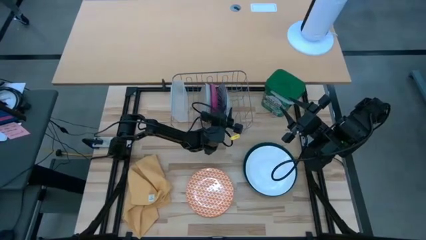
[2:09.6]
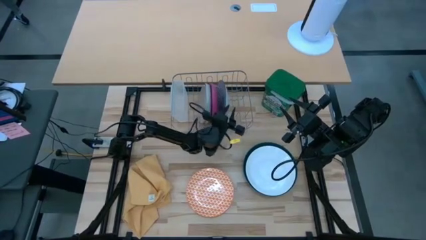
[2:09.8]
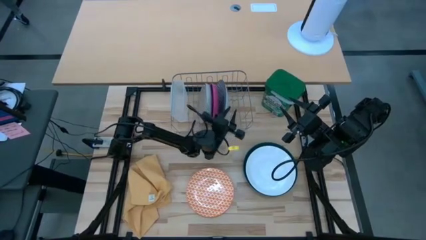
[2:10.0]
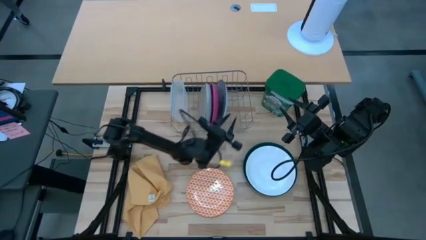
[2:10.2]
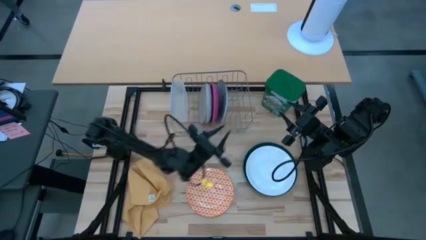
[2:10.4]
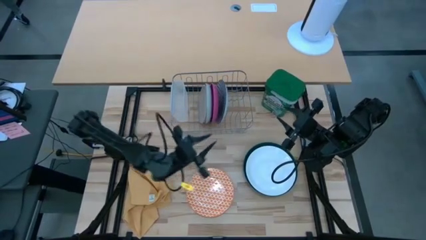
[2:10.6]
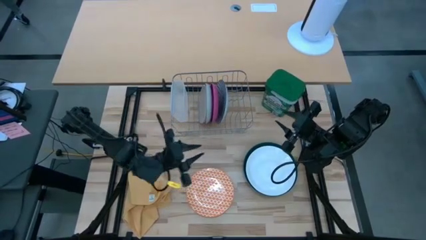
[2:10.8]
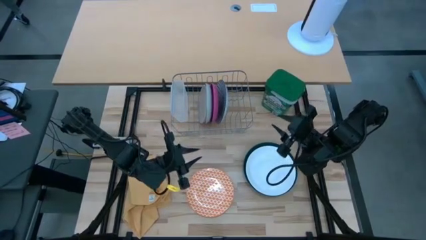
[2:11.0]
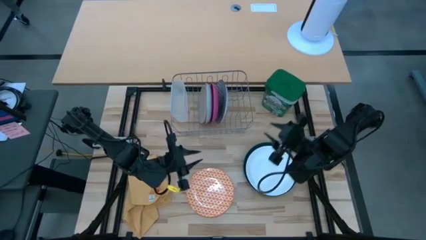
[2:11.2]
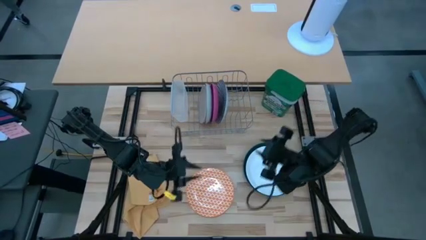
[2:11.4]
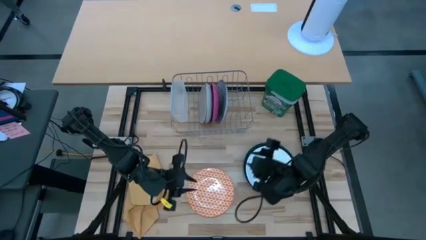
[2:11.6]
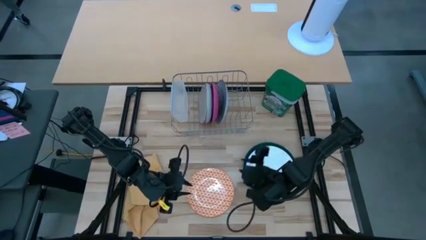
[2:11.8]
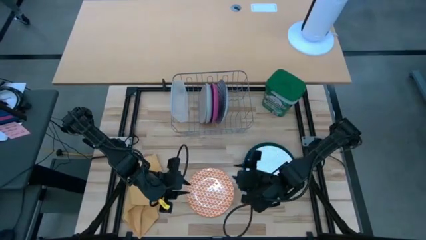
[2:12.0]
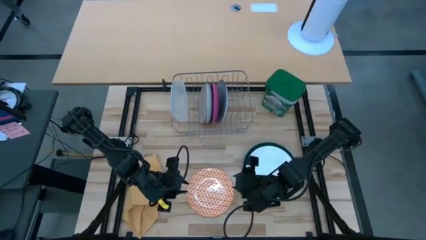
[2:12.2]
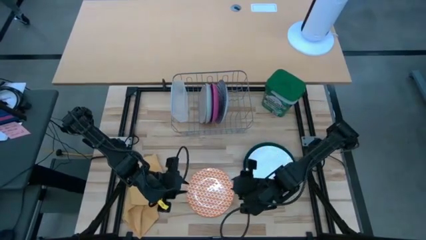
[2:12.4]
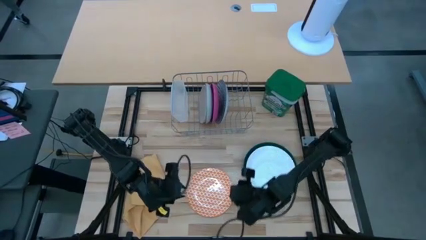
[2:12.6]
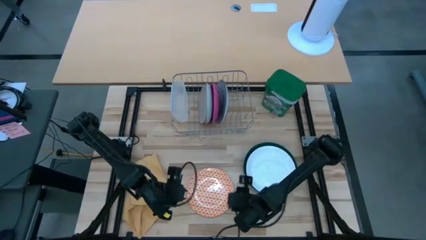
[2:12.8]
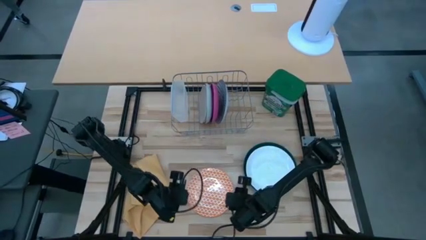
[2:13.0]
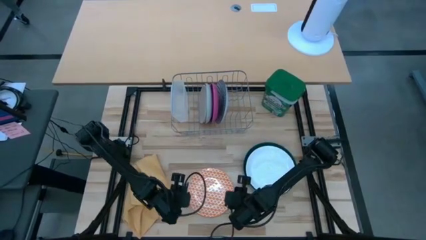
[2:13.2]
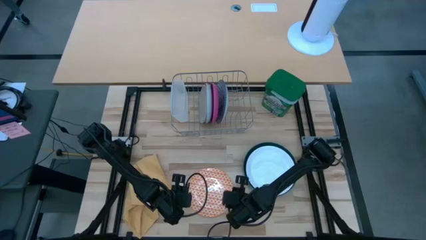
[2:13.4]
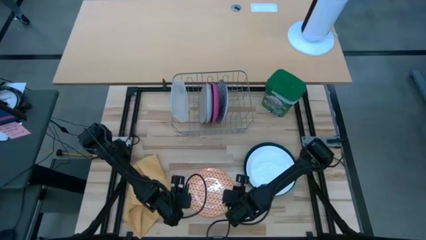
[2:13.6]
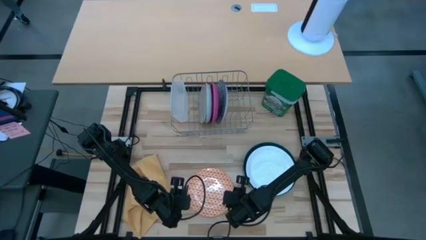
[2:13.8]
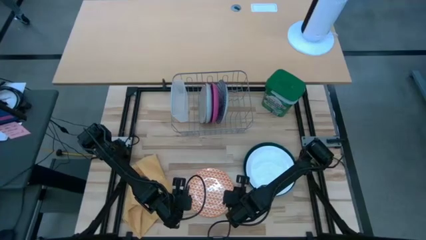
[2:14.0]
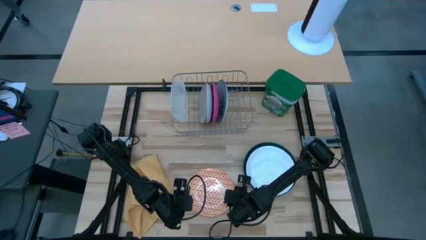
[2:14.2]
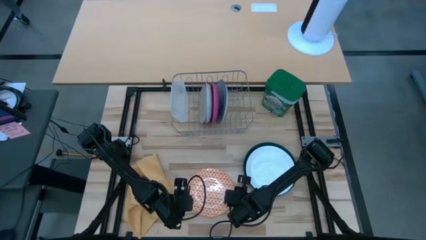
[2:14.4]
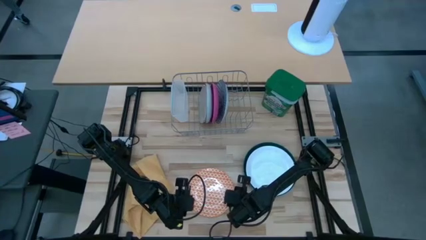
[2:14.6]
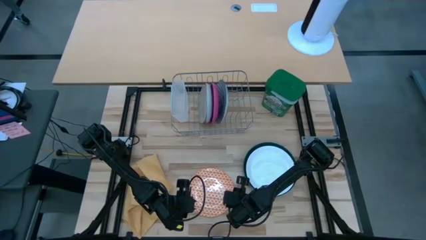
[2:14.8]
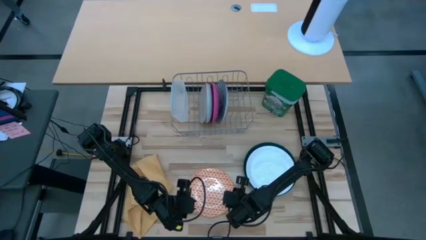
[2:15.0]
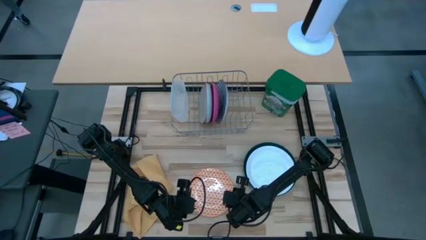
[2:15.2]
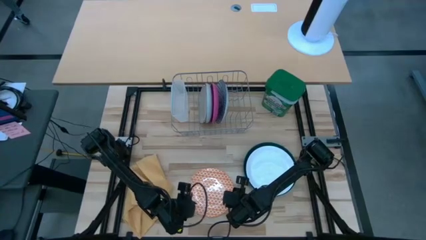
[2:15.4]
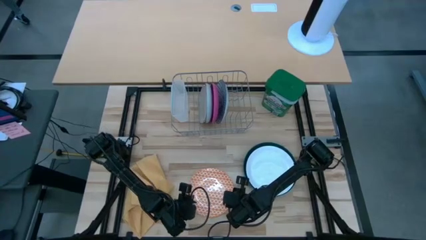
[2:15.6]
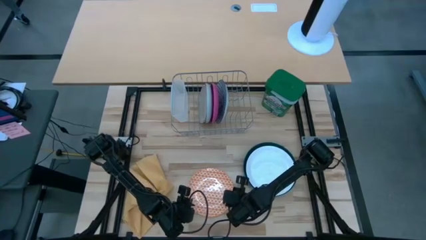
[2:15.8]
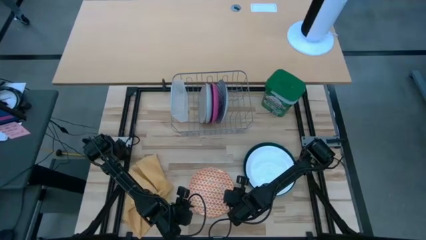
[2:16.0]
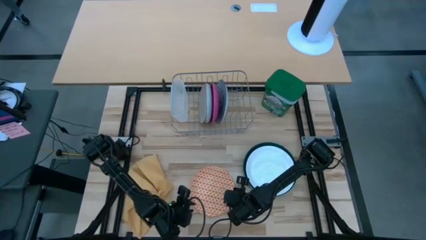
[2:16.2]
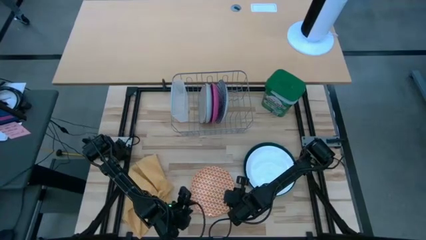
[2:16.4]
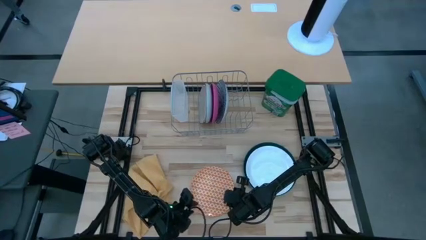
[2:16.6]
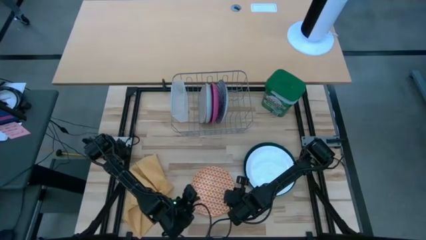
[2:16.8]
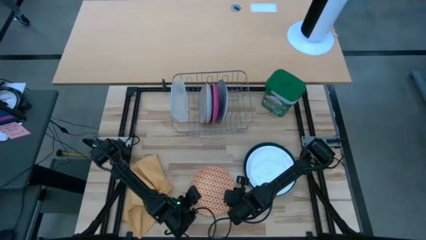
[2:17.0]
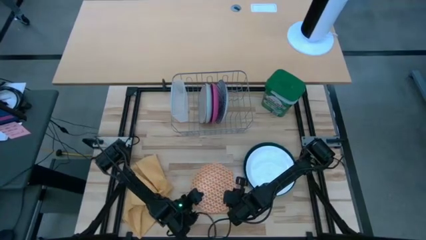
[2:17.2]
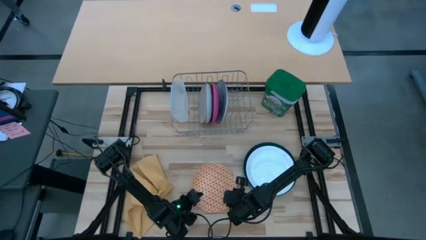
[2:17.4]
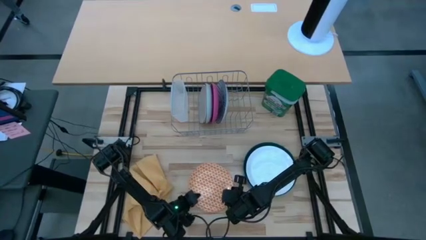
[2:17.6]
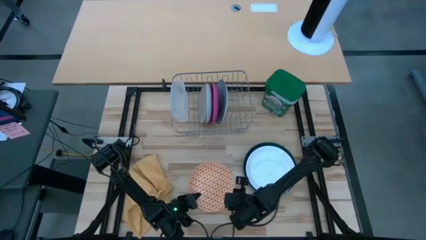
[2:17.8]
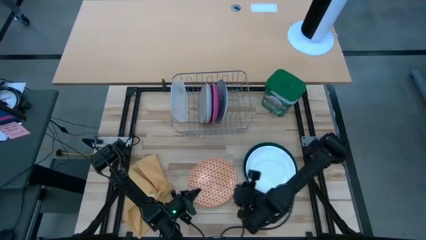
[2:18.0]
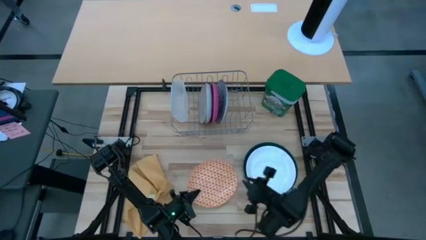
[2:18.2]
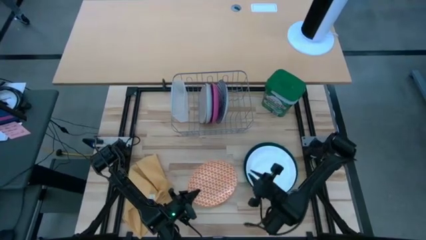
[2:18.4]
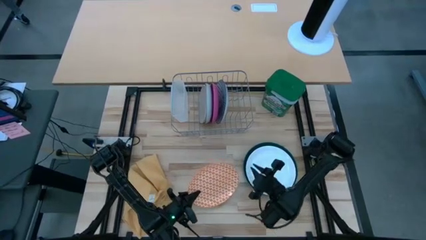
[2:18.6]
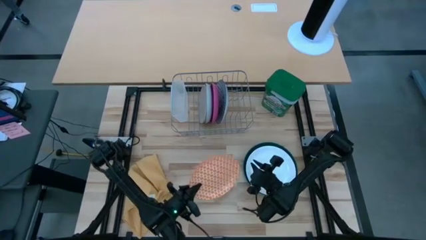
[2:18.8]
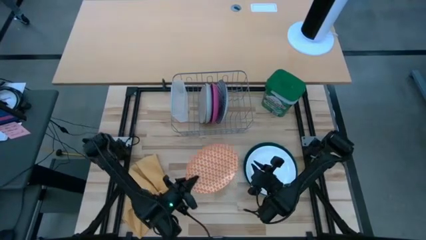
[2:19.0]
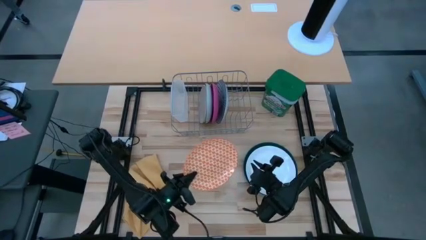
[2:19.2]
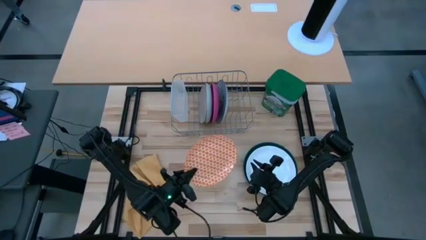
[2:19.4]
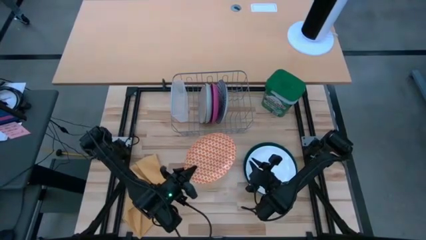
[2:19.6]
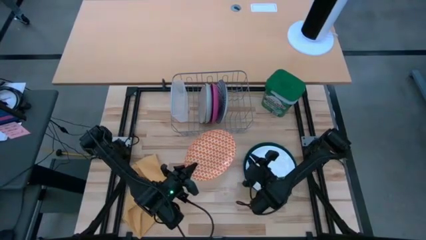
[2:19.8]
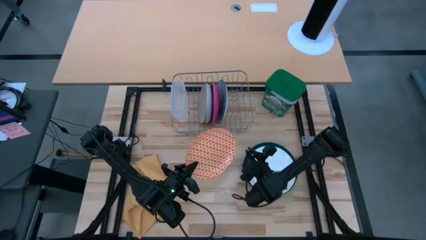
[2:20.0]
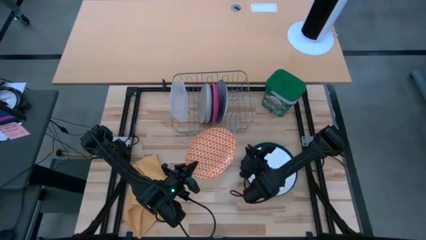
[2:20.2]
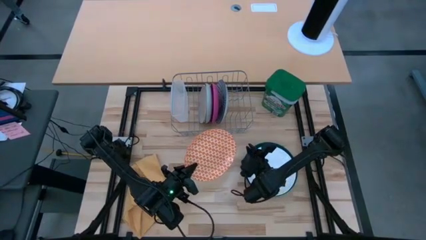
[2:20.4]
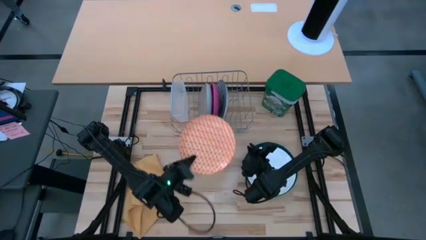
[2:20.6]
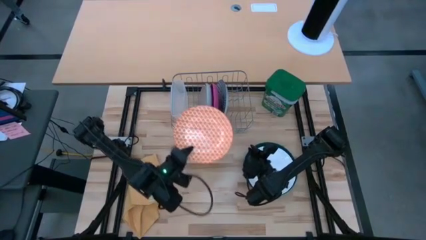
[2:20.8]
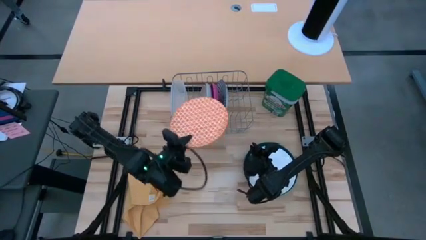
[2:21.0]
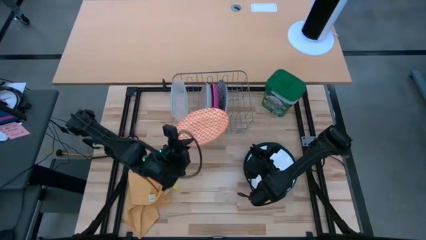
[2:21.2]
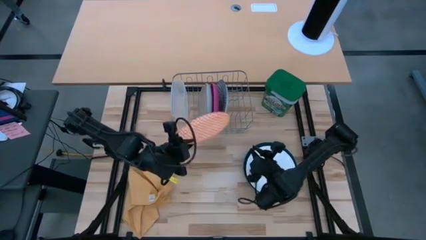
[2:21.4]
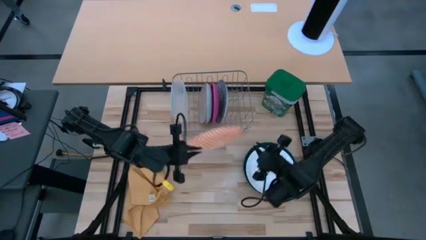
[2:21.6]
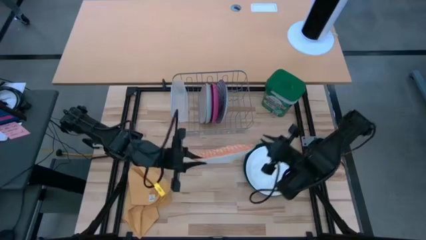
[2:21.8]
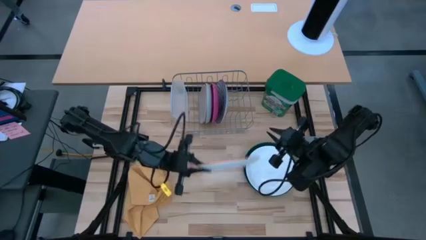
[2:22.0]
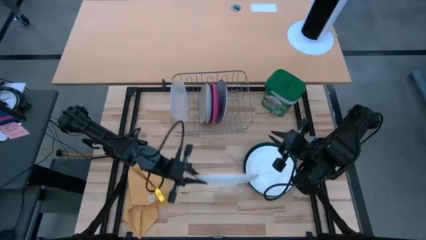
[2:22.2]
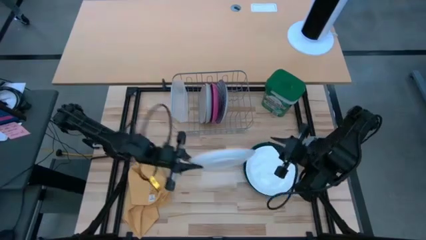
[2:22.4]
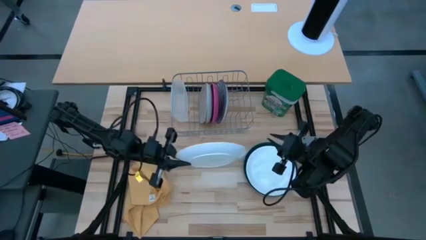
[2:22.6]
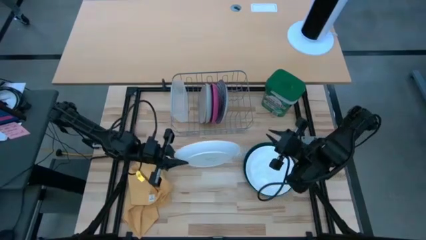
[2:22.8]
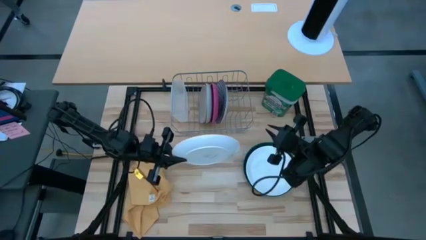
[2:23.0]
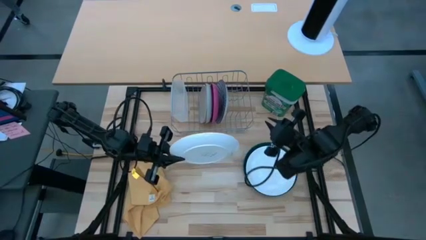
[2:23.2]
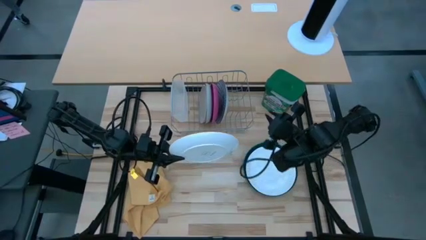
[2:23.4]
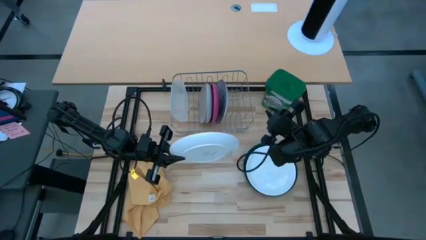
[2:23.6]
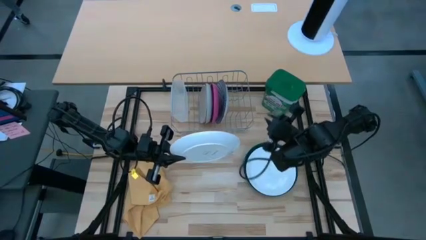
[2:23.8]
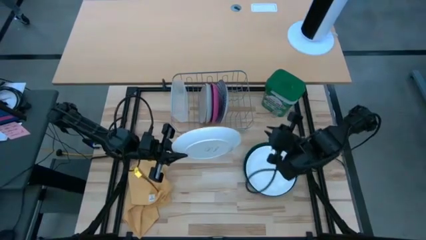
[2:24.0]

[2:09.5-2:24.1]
Task: Sort dishes
Put the orange patterned plate into the dish rack

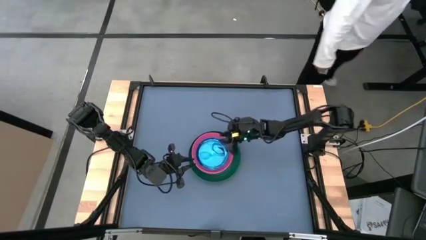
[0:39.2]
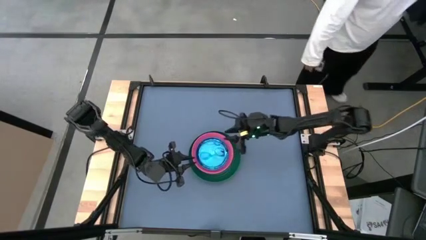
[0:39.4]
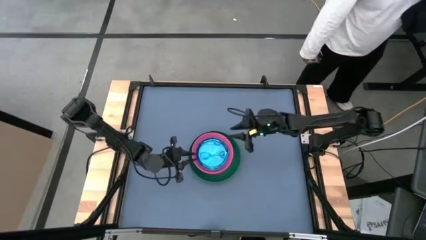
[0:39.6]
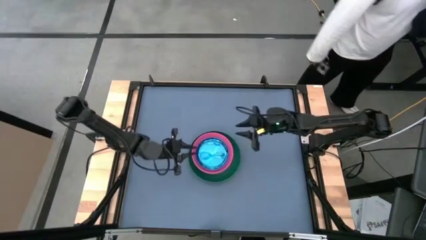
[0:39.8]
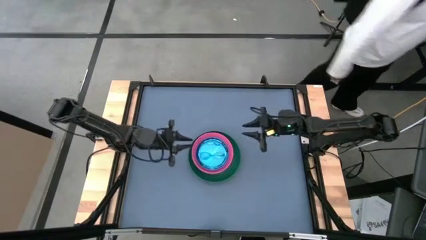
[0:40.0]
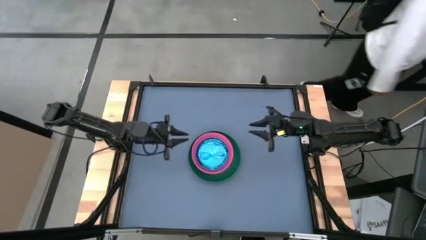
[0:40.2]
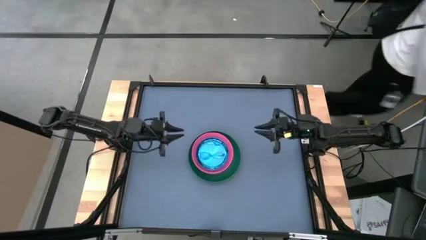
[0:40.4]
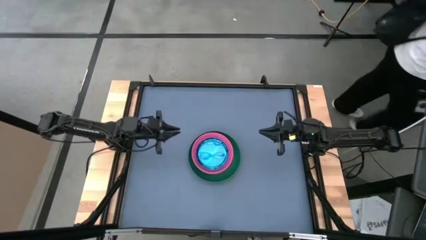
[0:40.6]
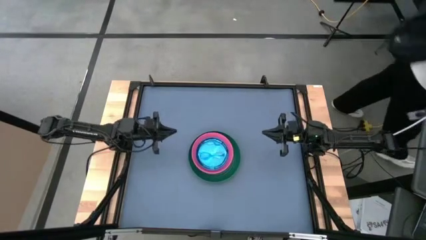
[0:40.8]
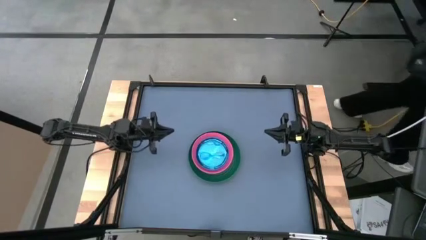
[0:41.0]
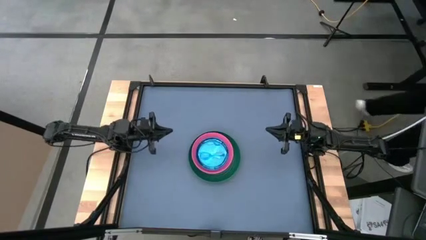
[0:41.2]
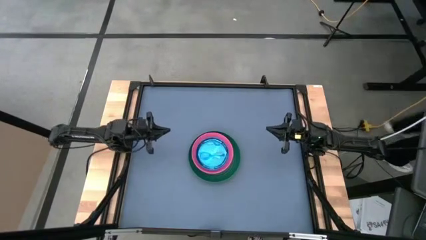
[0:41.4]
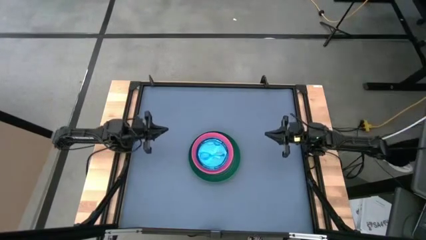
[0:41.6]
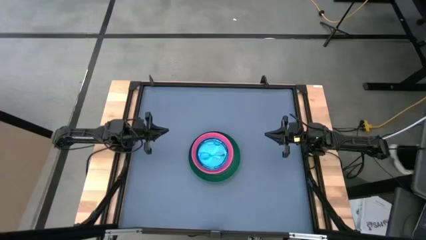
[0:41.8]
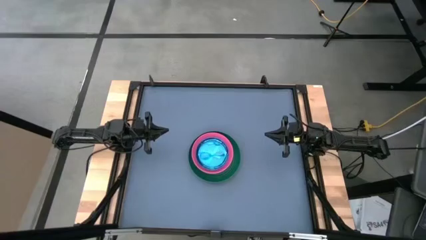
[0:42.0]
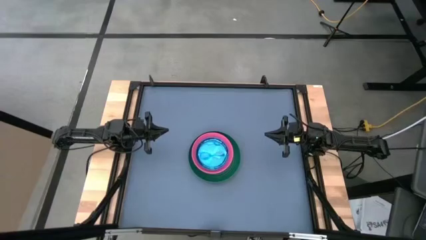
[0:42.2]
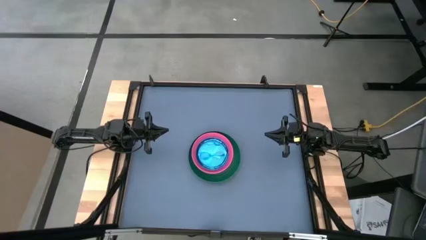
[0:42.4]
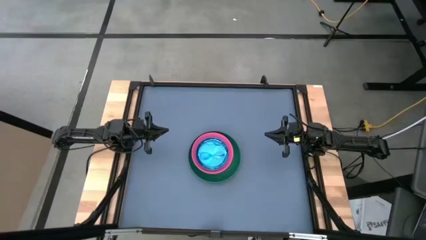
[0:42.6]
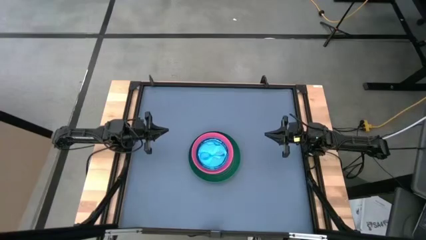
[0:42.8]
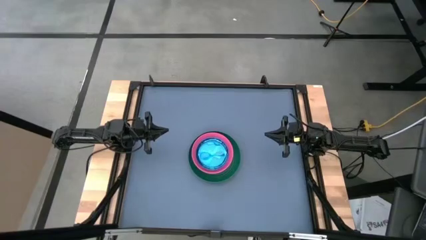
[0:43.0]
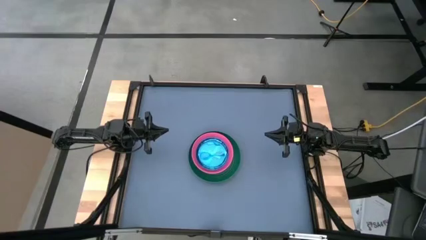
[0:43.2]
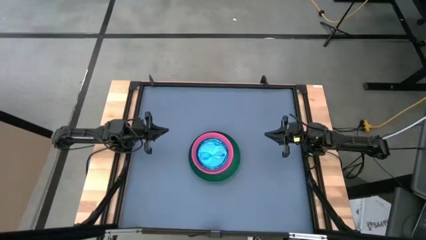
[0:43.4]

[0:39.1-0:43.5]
Task: Stack plastic plates
Return to Home Position
